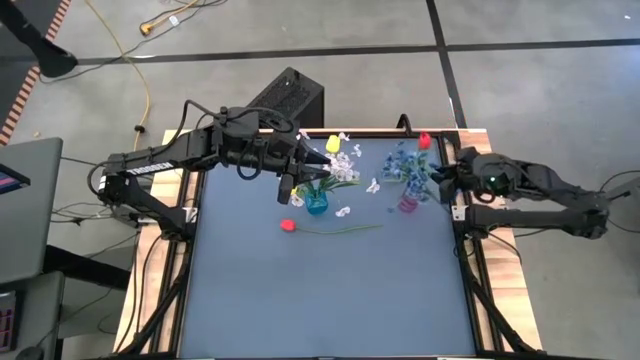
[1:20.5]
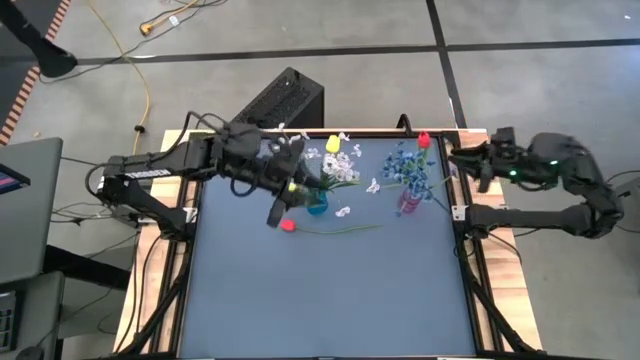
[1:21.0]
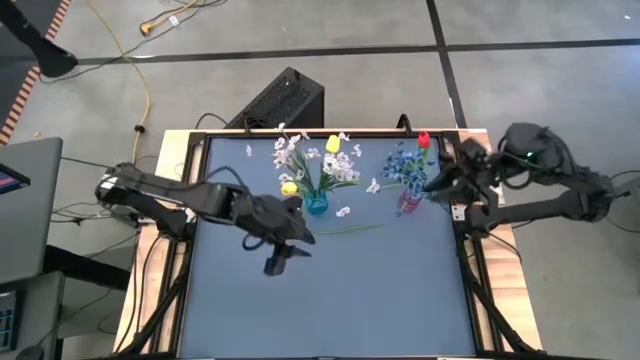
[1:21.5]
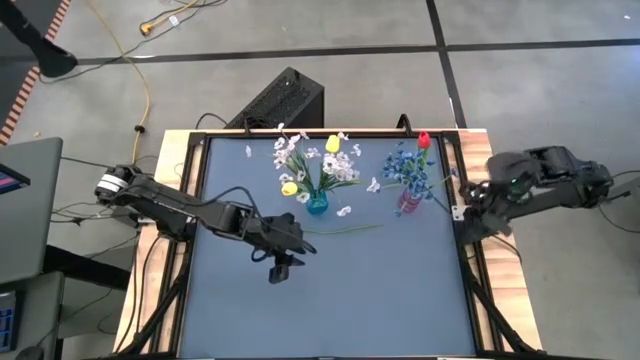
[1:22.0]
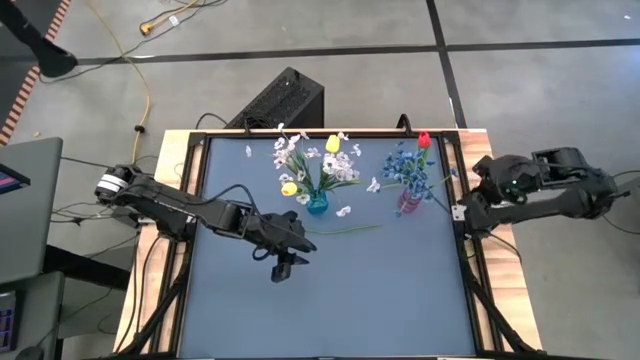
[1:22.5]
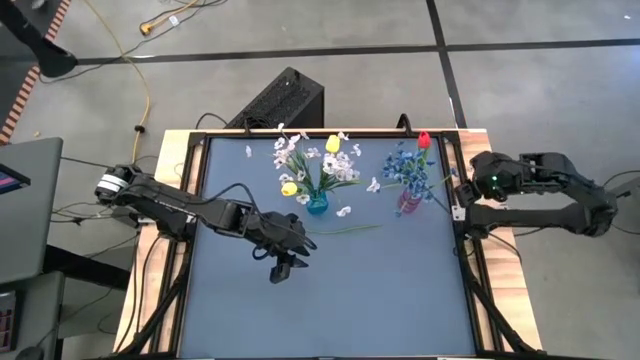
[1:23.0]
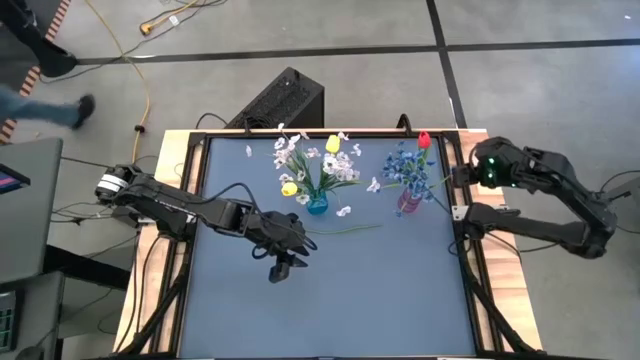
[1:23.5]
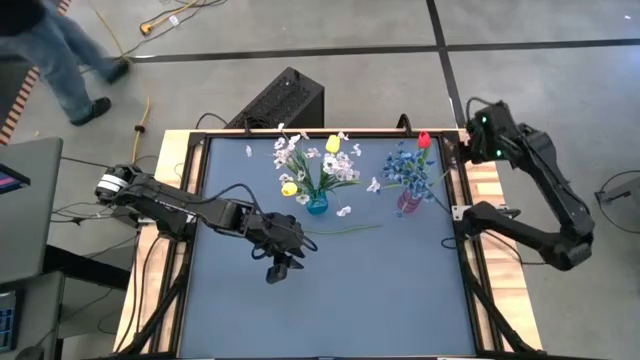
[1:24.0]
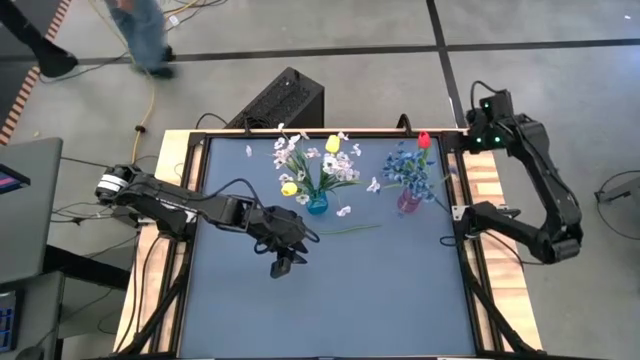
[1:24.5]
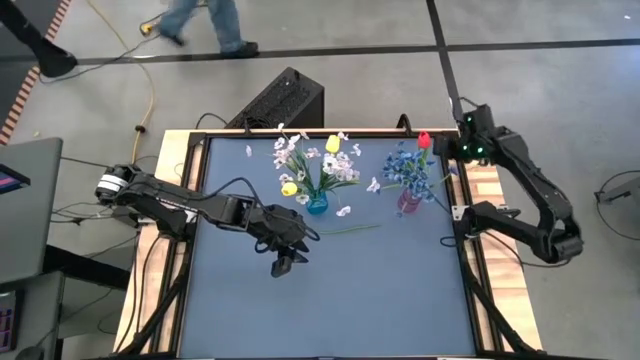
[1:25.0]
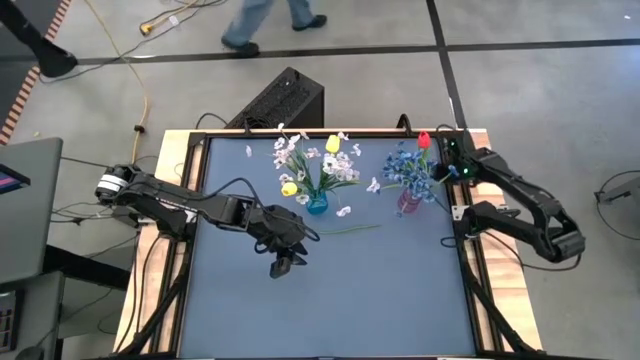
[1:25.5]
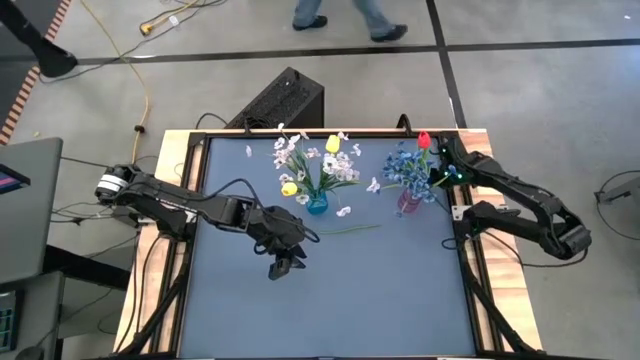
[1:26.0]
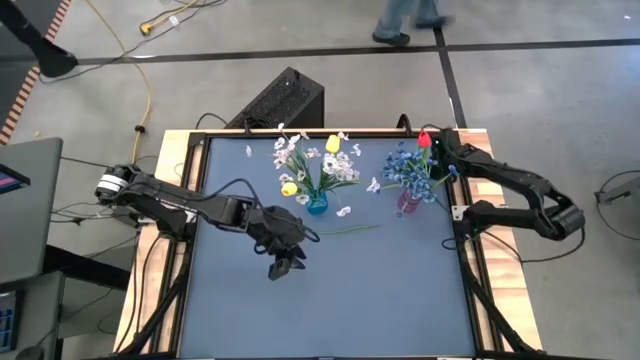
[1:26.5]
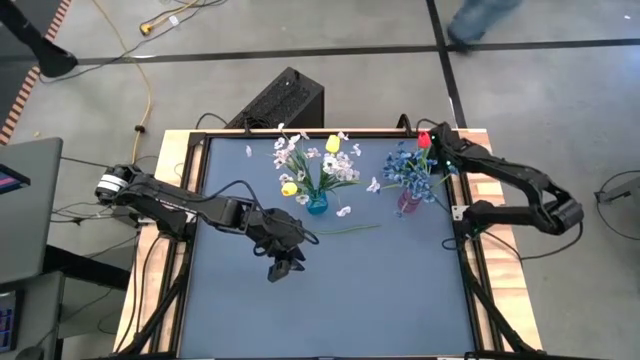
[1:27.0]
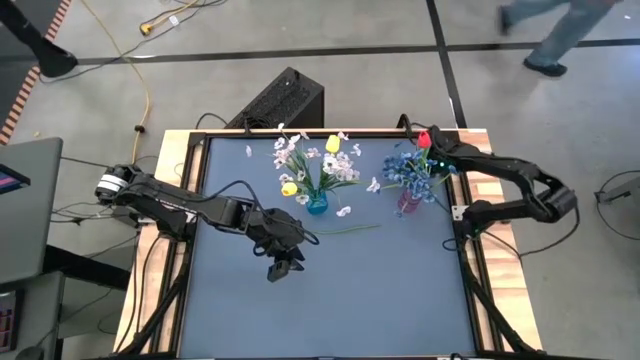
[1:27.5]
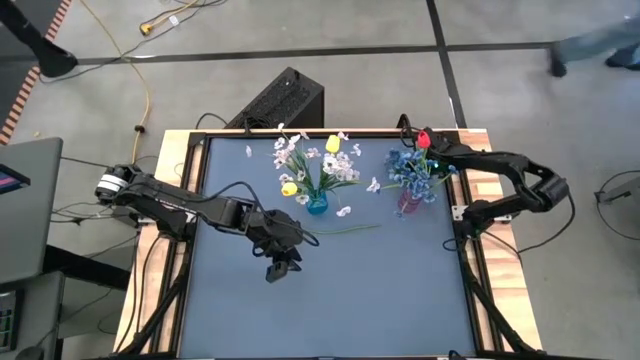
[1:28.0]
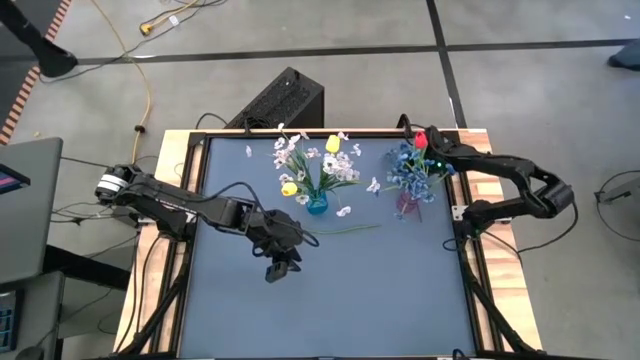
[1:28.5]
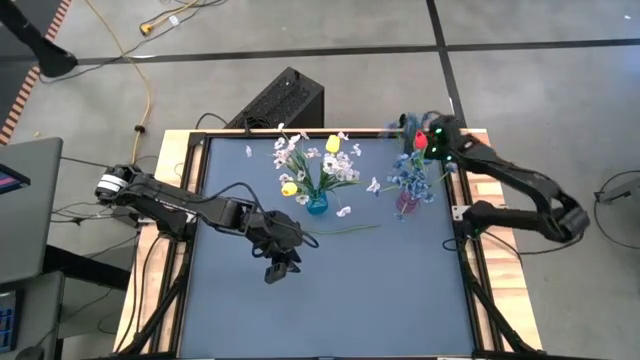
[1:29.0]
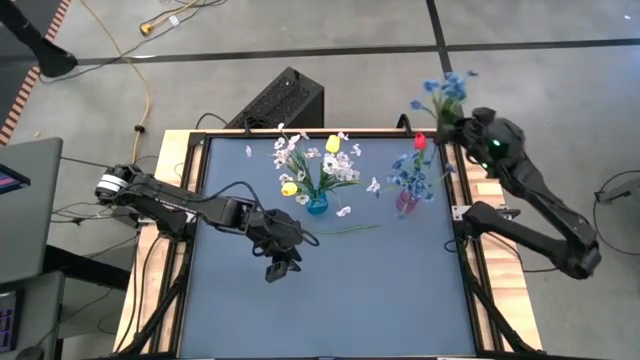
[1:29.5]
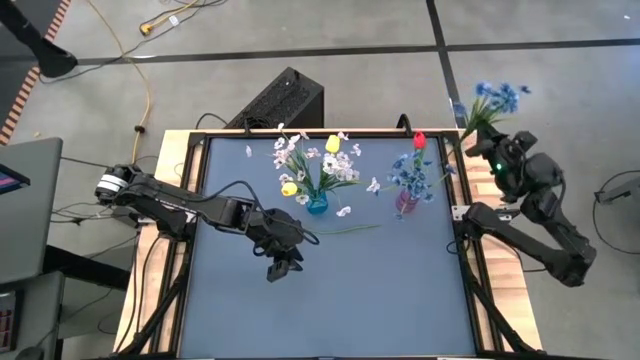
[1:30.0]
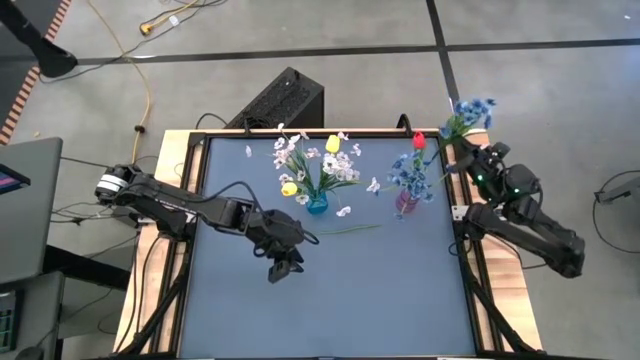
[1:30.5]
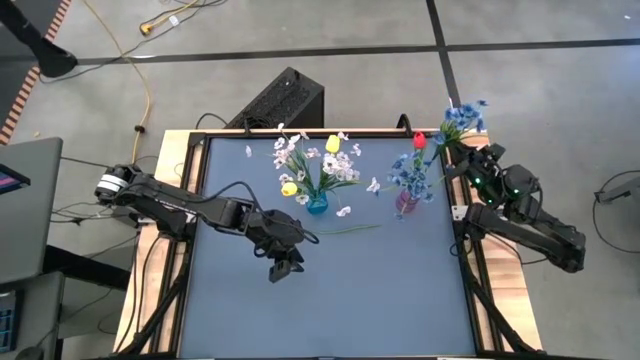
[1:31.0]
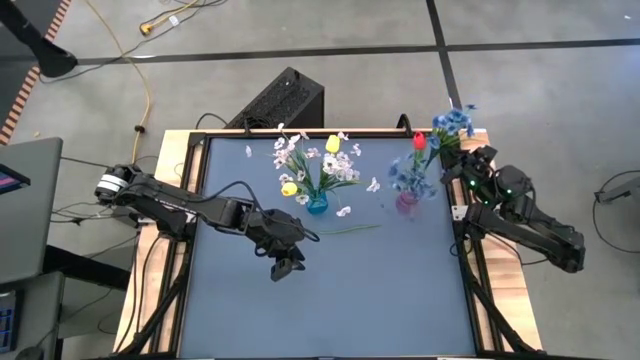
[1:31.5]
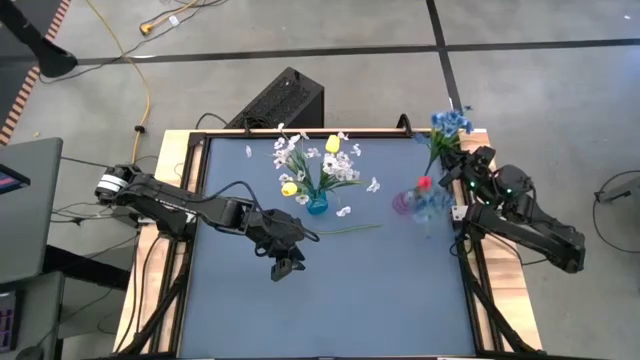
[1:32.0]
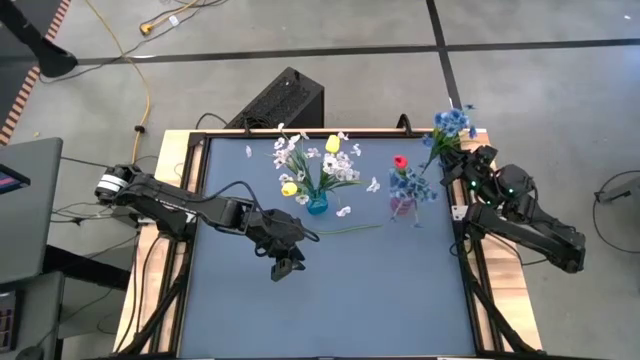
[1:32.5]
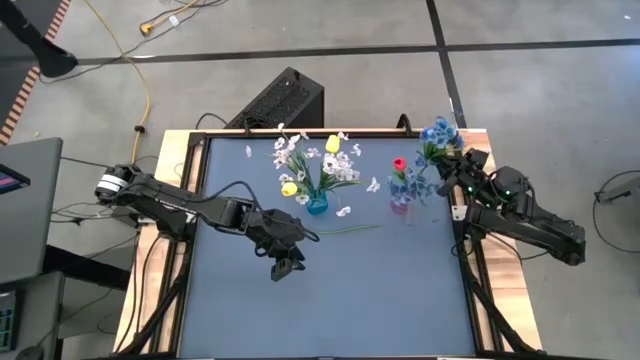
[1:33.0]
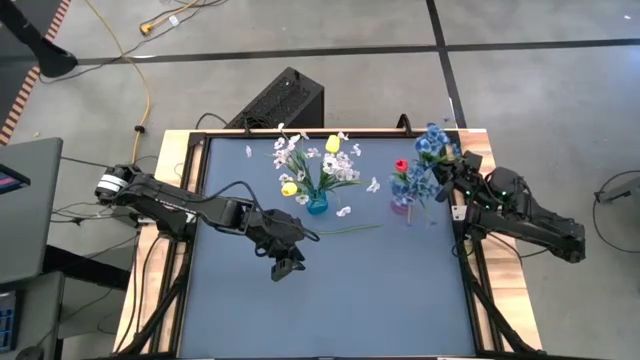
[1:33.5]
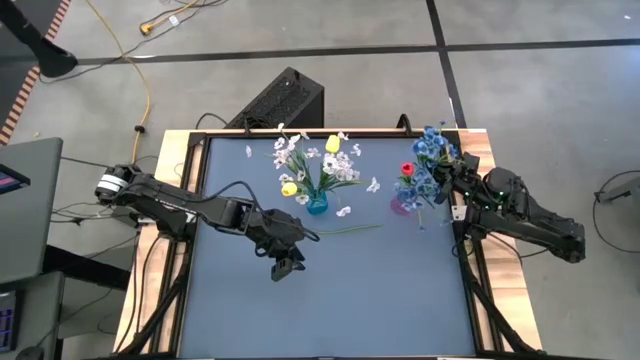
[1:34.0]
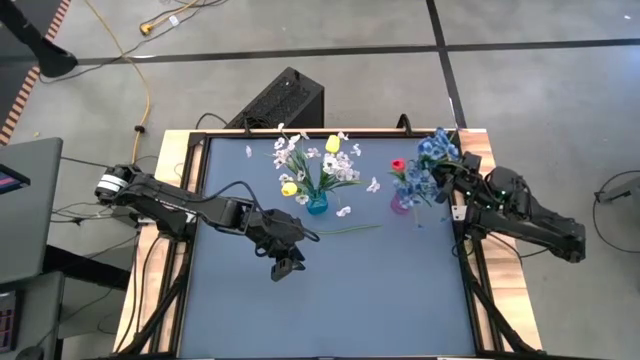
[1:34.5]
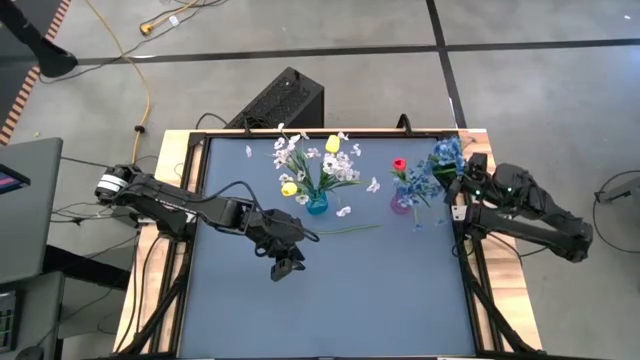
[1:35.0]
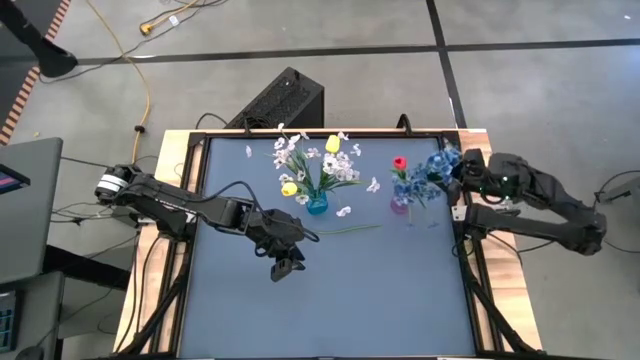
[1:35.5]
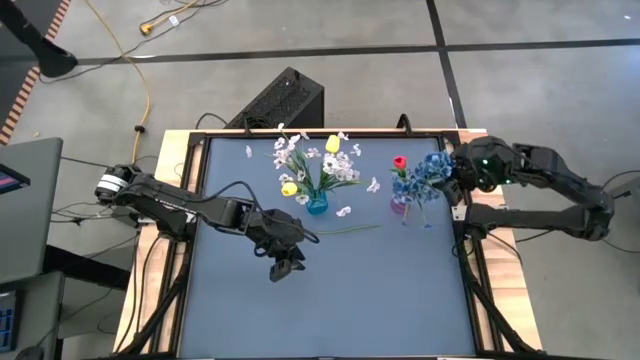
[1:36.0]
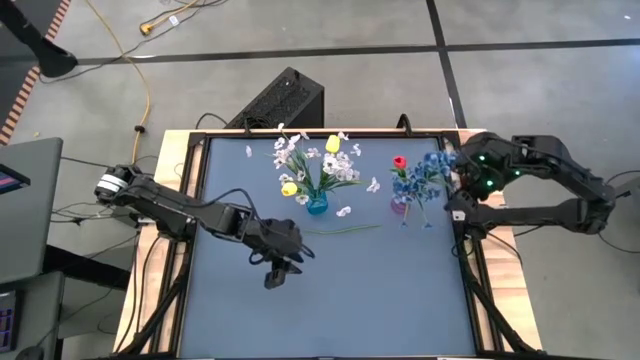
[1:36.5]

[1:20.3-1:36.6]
Task: Sort flowers into vase by color
Put the blue flowers into the violet vase
